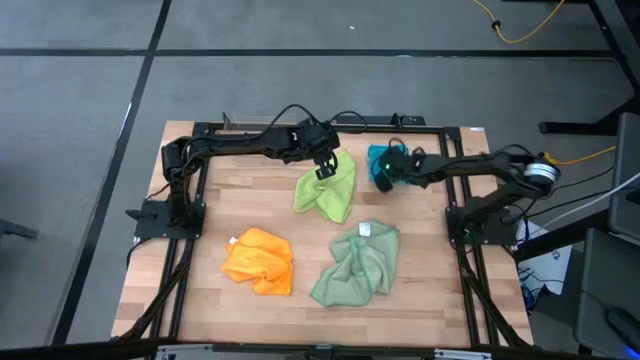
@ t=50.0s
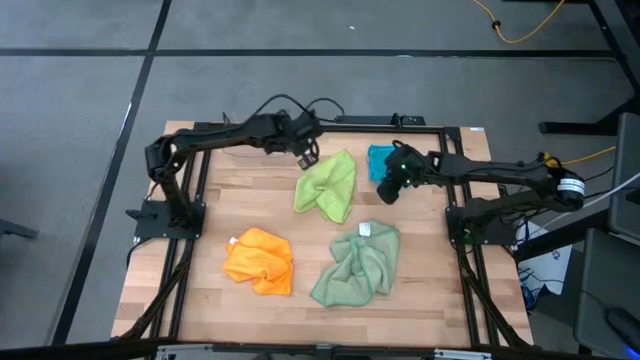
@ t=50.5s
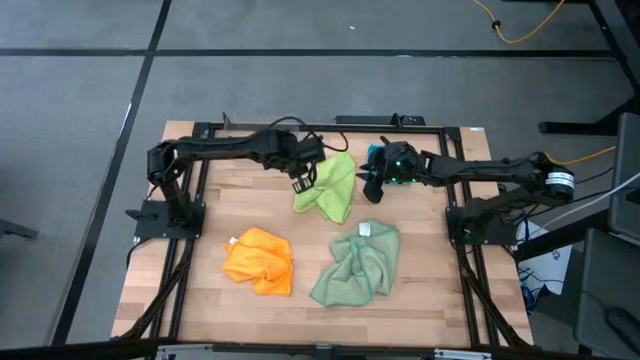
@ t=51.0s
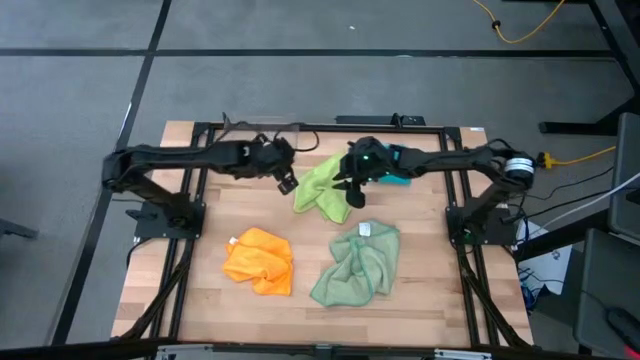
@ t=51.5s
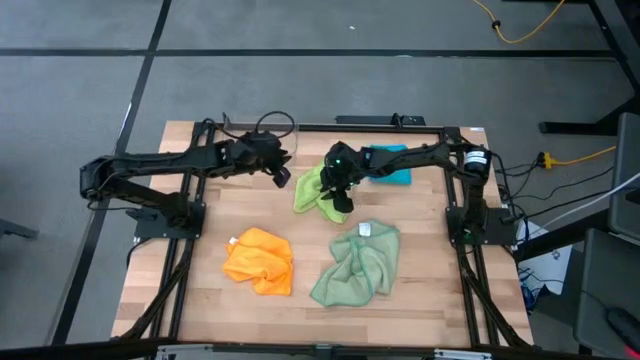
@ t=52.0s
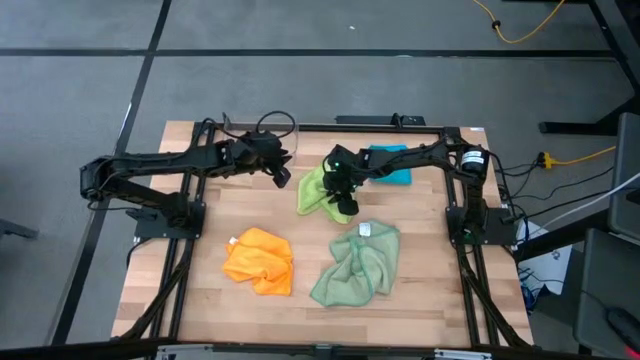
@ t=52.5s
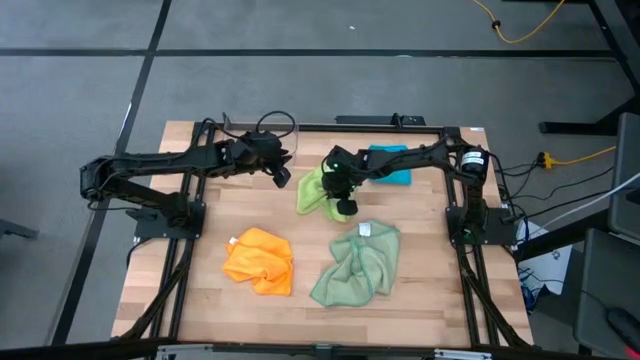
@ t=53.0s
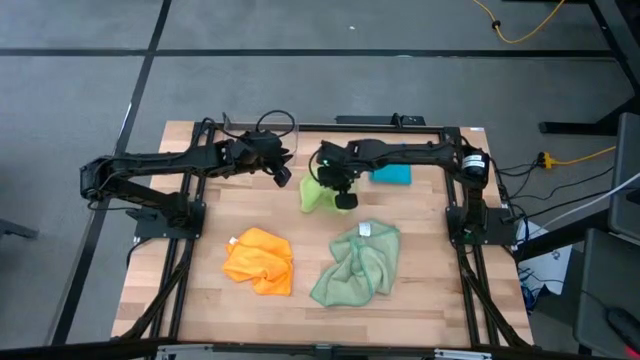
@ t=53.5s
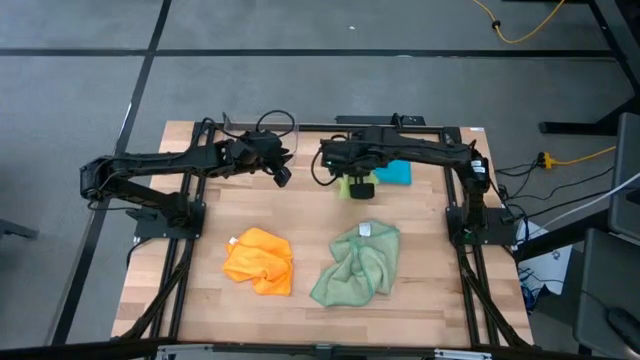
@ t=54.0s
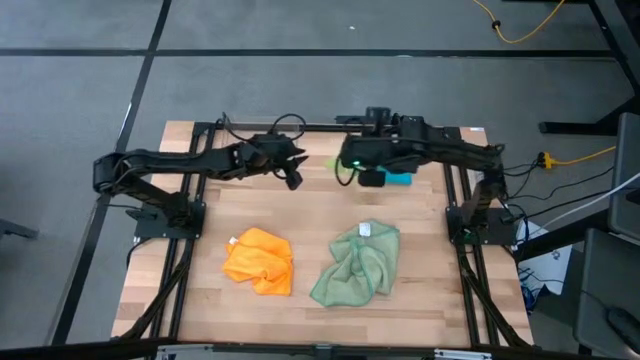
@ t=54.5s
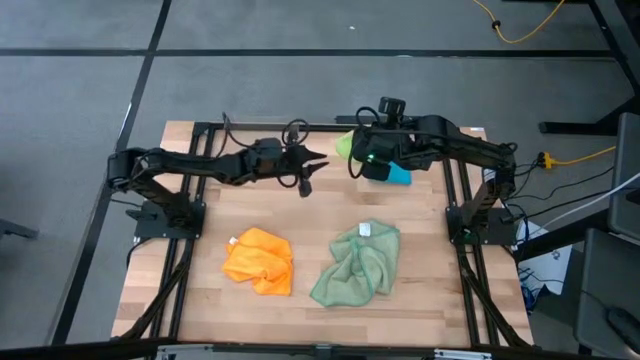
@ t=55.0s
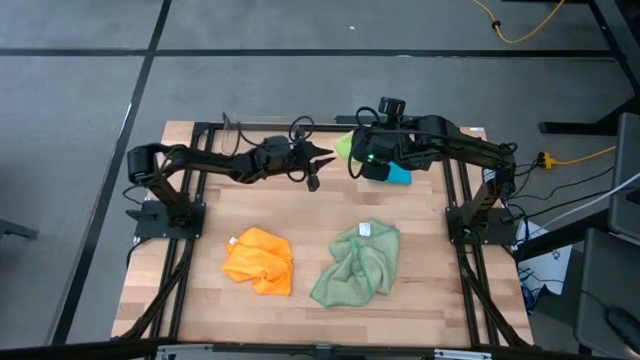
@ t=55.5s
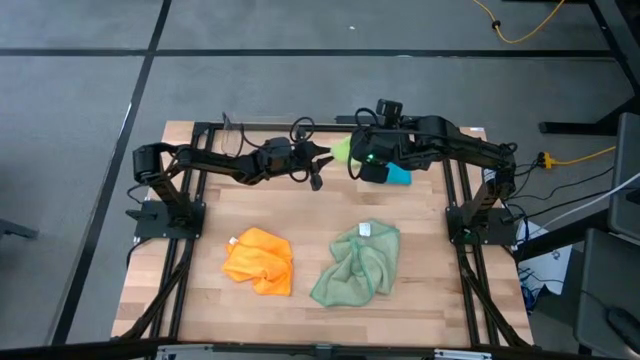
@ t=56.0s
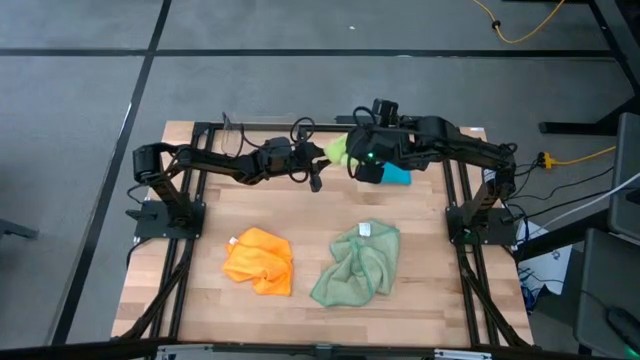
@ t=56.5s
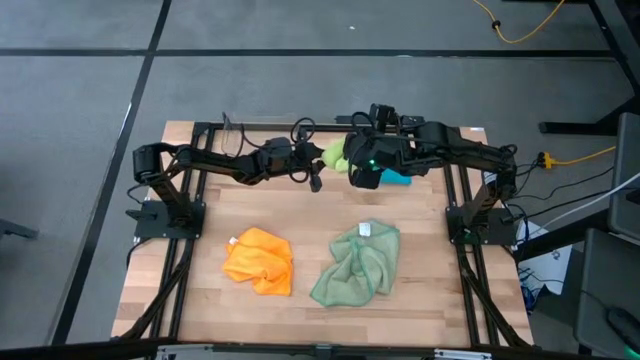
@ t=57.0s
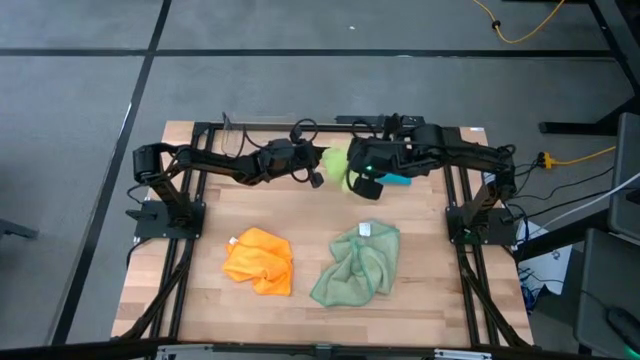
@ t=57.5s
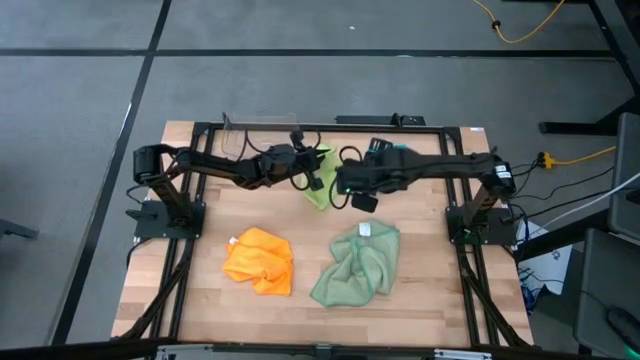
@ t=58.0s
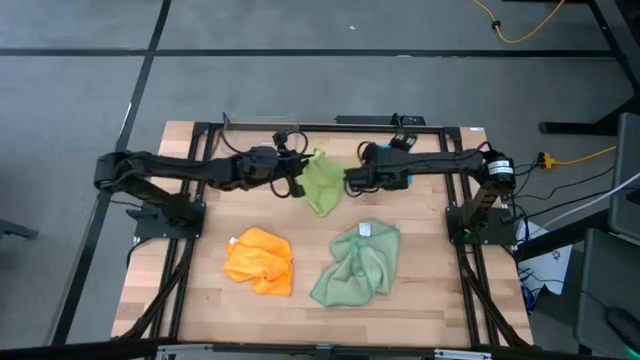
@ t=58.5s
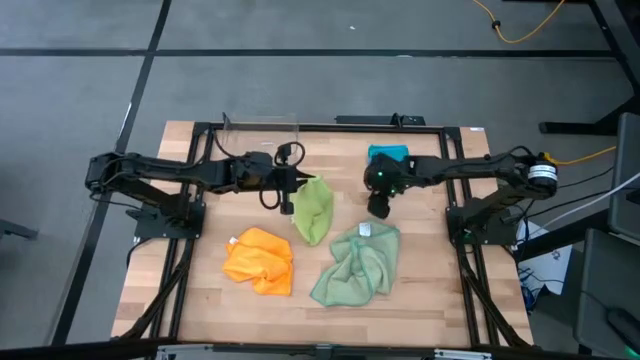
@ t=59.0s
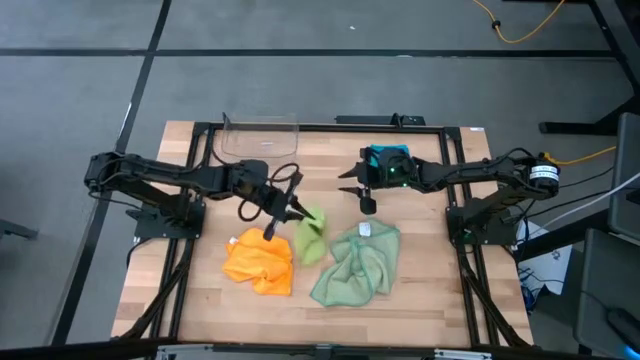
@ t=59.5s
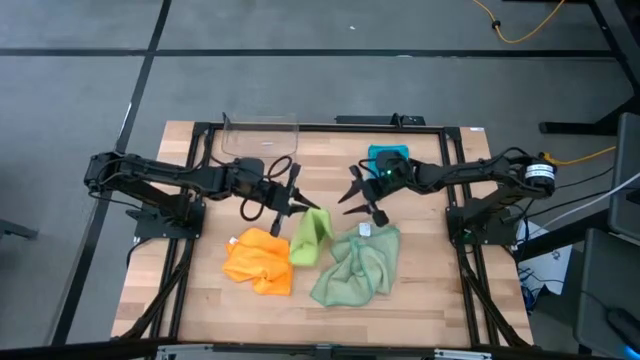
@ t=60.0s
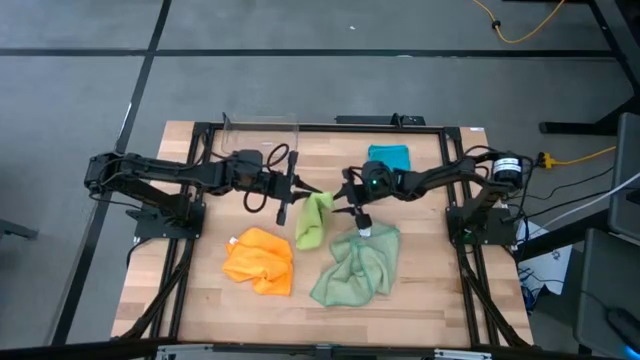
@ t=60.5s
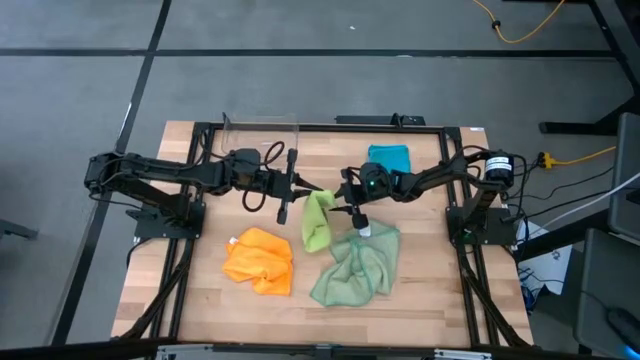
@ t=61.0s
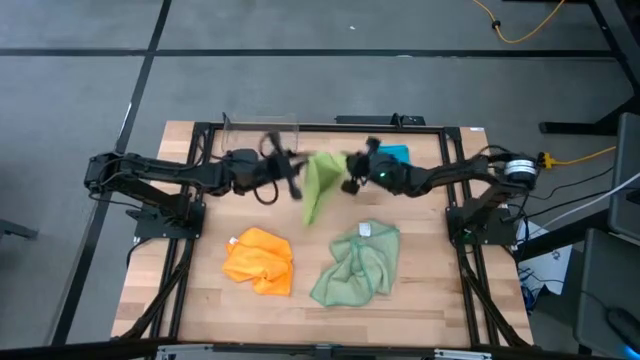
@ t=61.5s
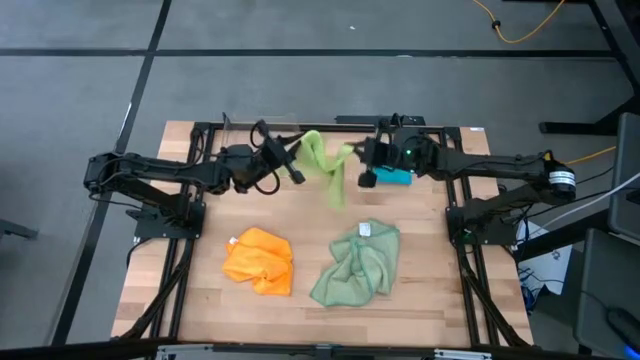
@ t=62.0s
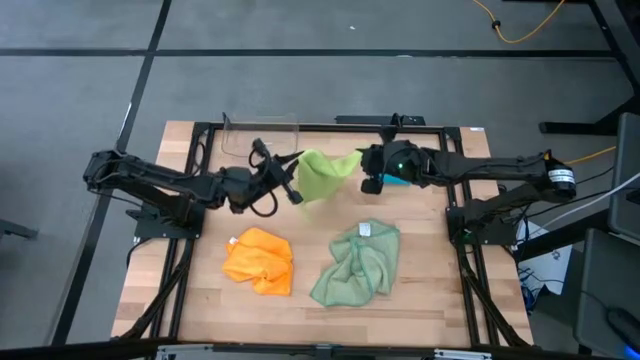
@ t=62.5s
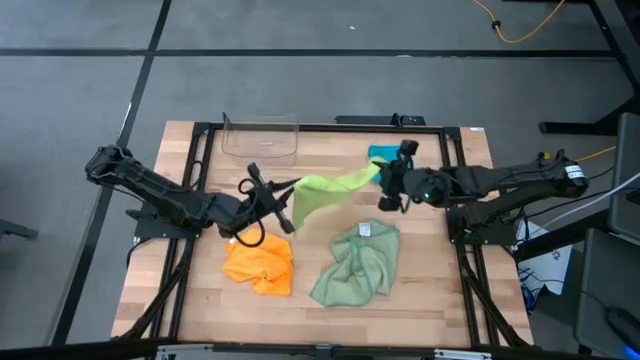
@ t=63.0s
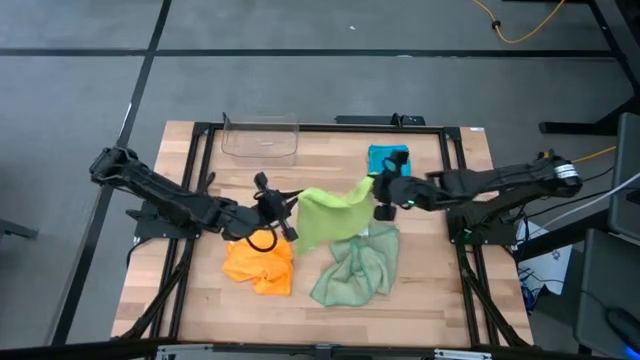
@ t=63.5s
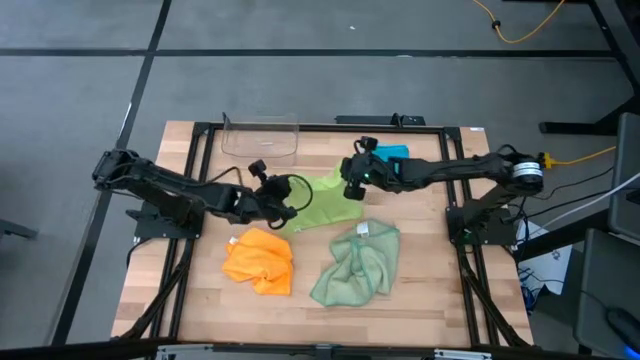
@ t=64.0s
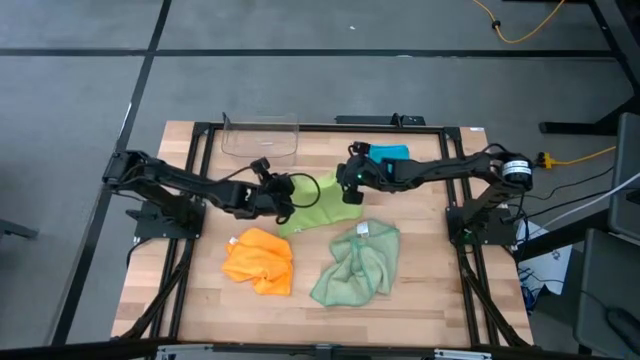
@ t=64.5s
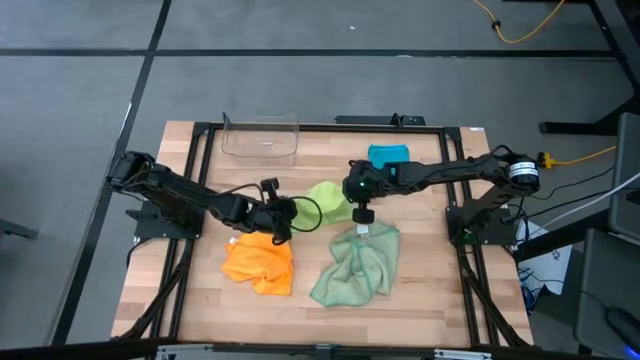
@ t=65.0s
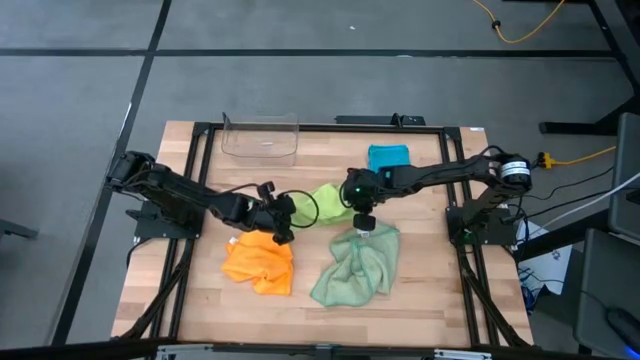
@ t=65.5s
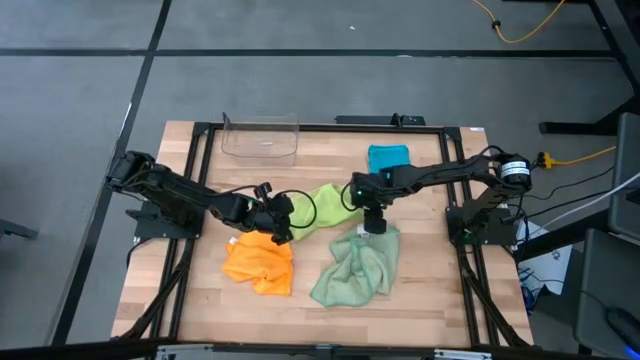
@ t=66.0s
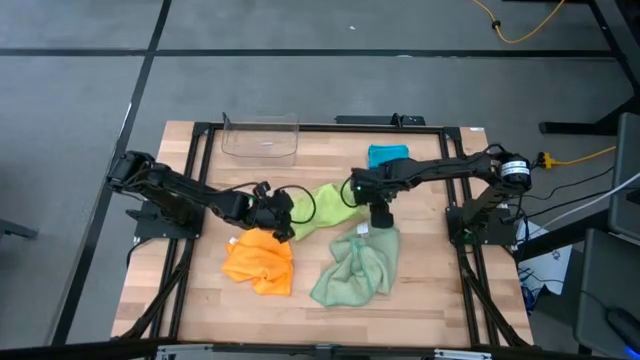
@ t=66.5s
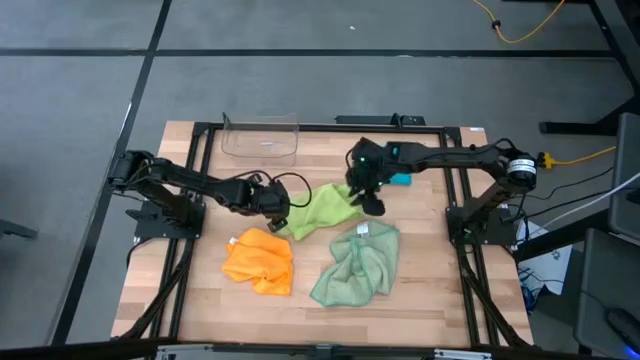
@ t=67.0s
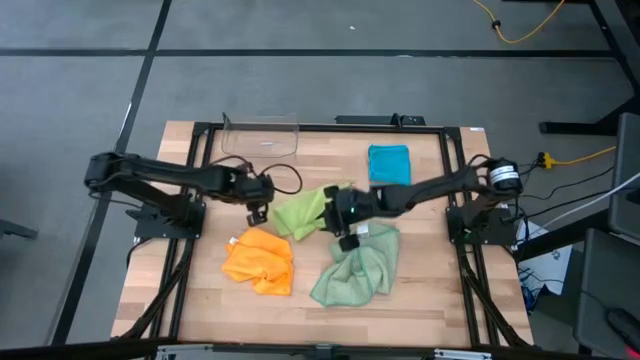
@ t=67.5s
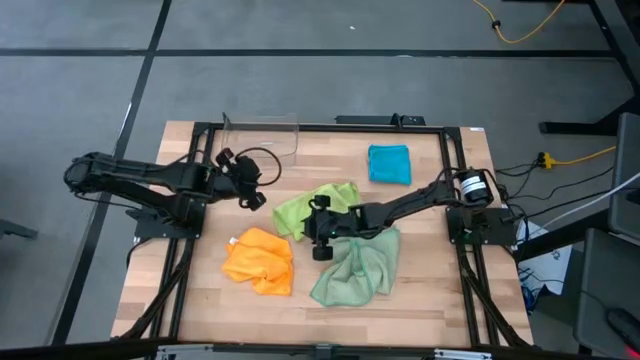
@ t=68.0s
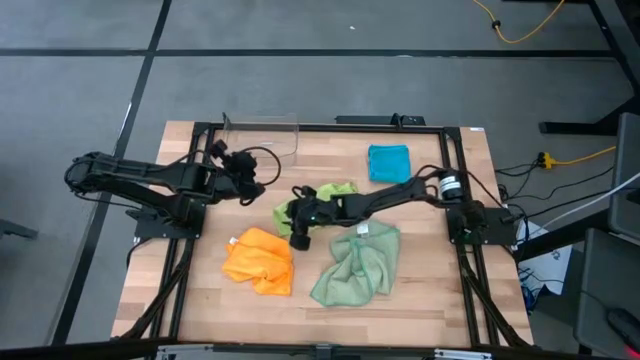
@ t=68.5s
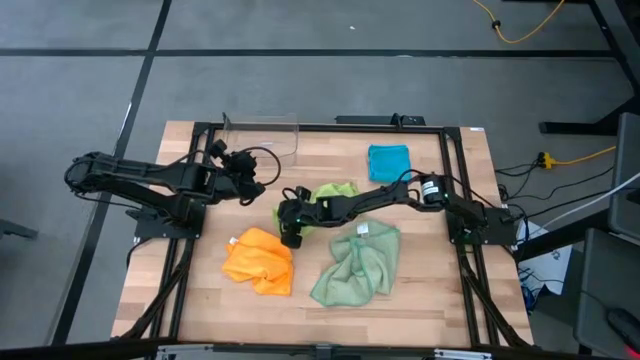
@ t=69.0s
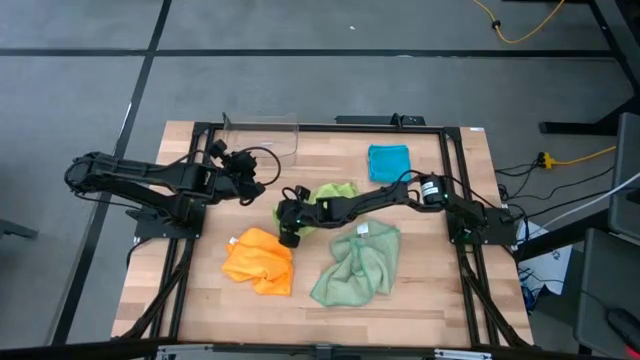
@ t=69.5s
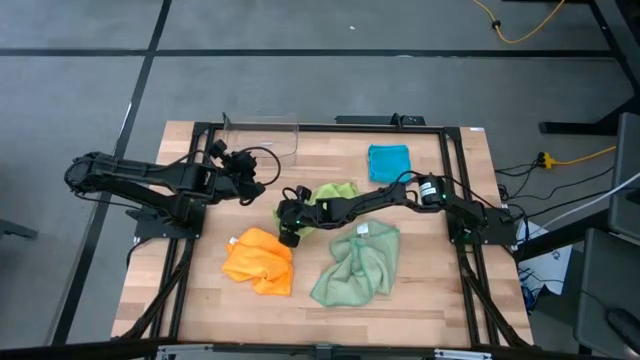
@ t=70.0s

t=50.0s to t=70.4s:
Task: Fold microfiber towels
Fold the light green towel
